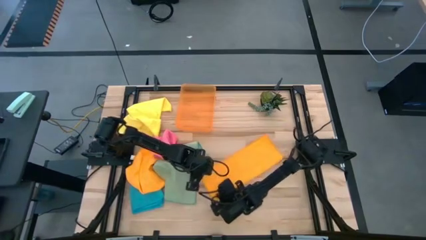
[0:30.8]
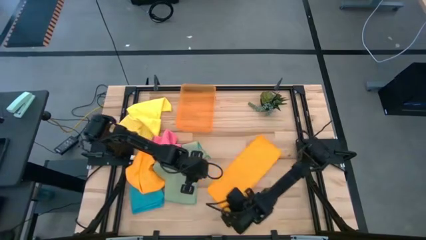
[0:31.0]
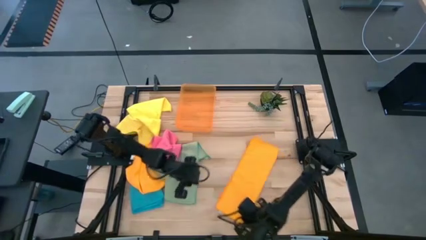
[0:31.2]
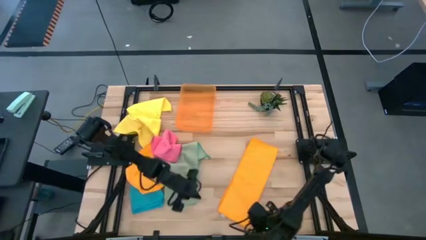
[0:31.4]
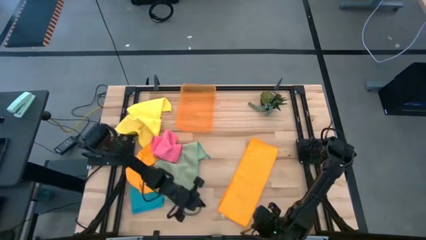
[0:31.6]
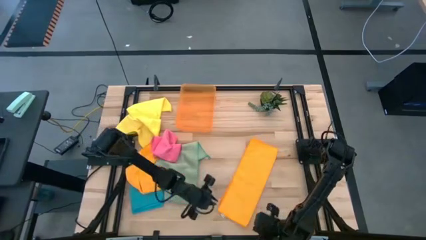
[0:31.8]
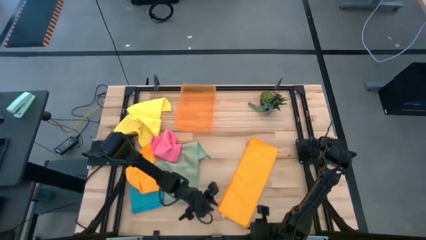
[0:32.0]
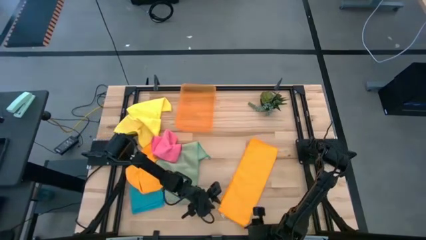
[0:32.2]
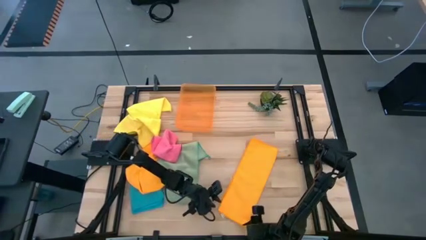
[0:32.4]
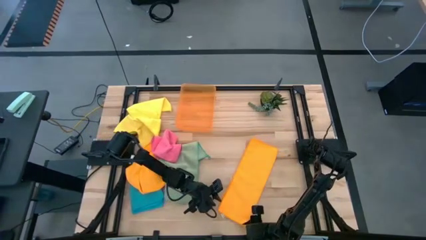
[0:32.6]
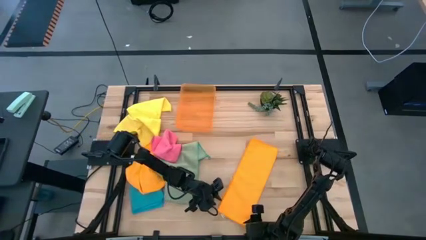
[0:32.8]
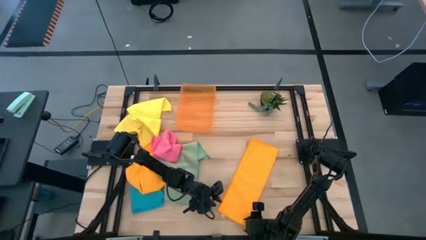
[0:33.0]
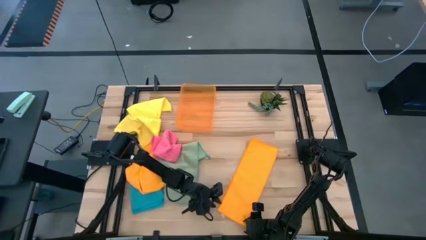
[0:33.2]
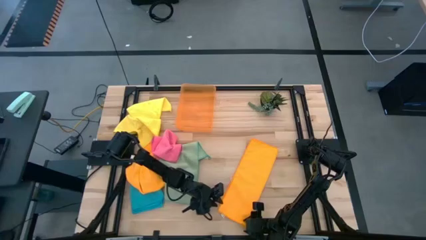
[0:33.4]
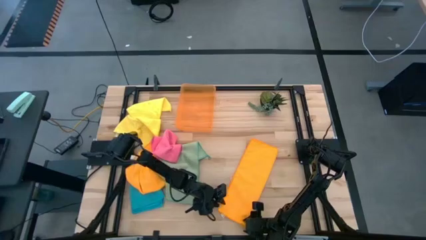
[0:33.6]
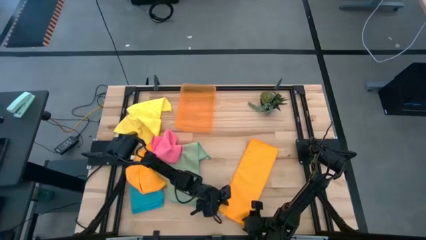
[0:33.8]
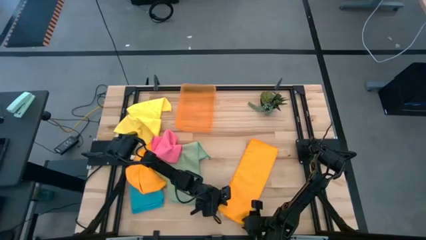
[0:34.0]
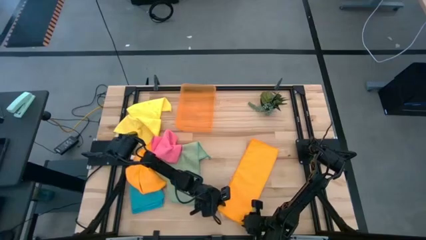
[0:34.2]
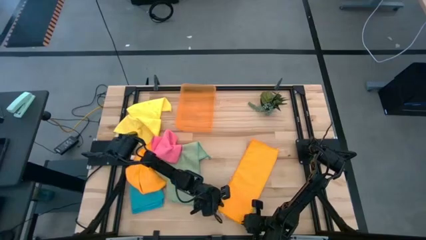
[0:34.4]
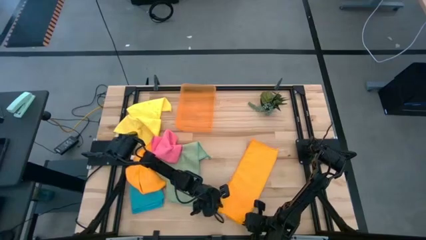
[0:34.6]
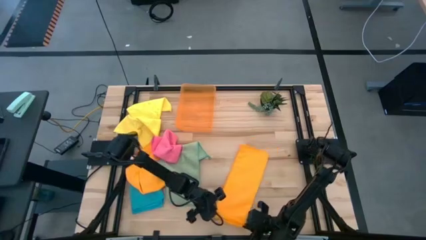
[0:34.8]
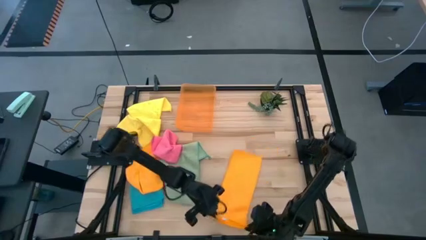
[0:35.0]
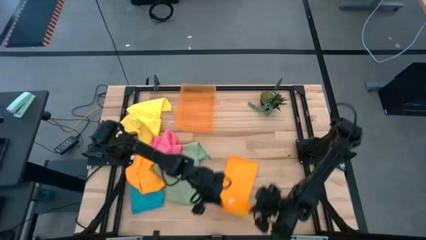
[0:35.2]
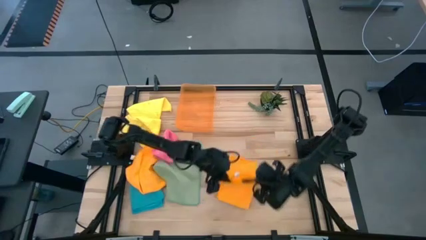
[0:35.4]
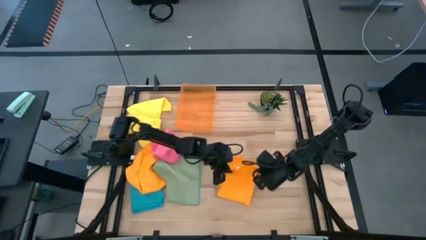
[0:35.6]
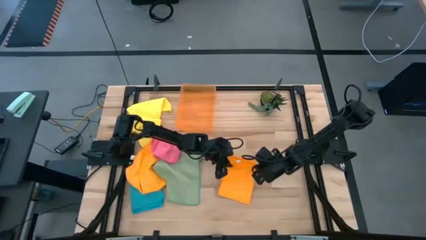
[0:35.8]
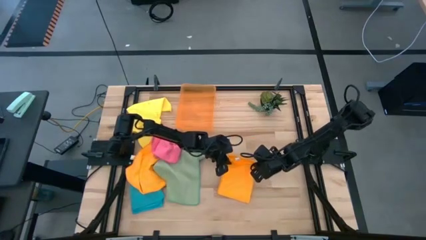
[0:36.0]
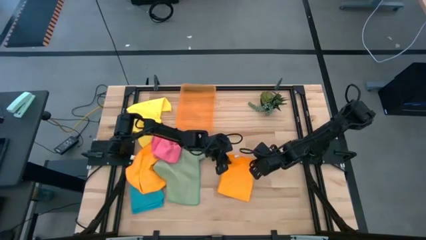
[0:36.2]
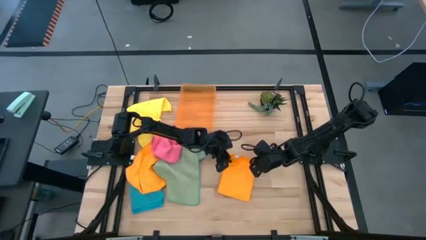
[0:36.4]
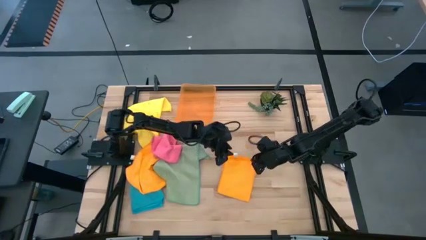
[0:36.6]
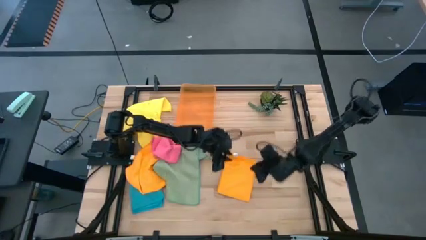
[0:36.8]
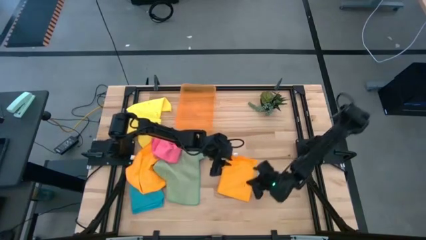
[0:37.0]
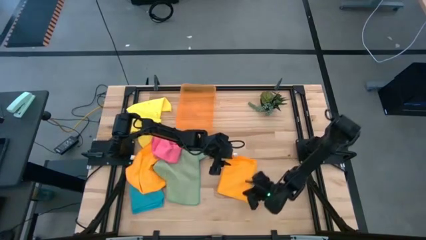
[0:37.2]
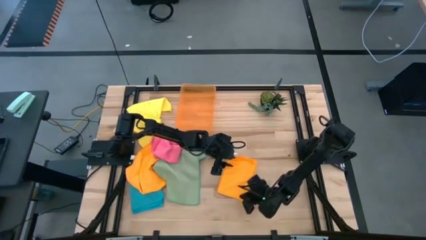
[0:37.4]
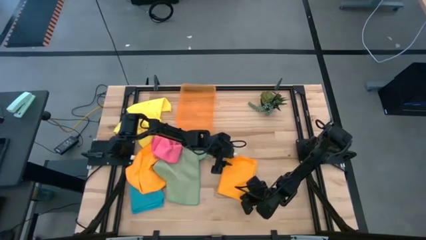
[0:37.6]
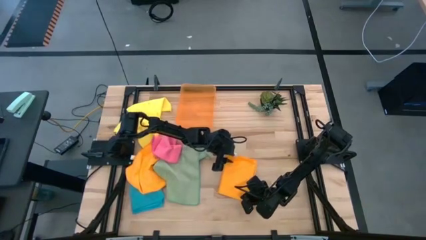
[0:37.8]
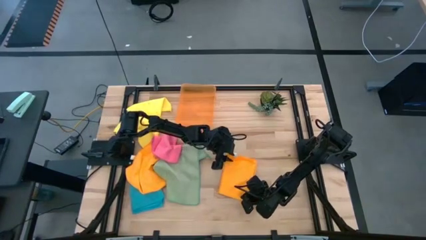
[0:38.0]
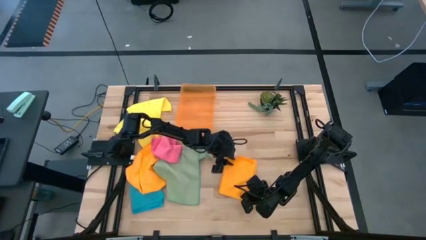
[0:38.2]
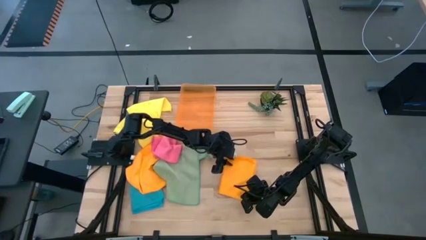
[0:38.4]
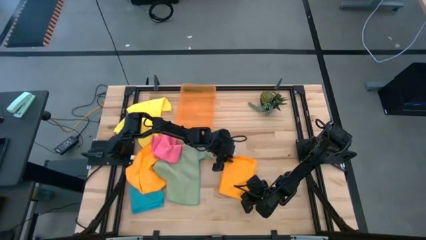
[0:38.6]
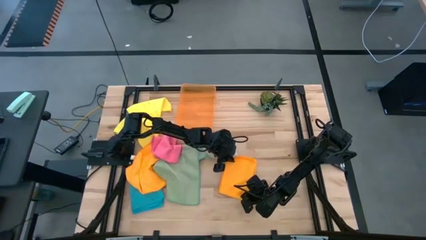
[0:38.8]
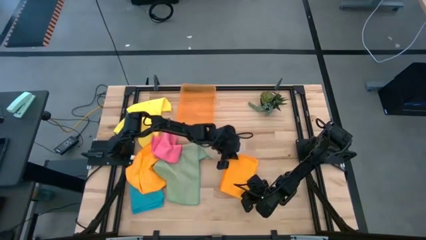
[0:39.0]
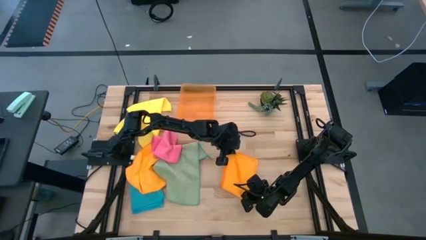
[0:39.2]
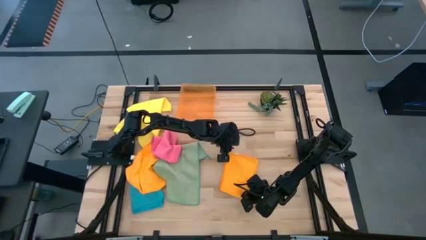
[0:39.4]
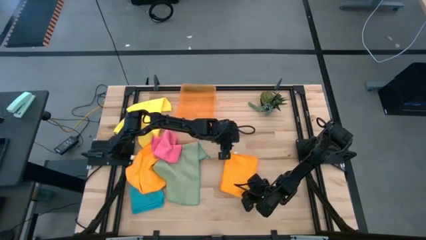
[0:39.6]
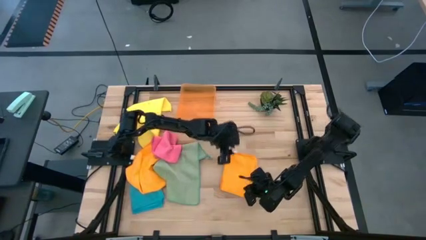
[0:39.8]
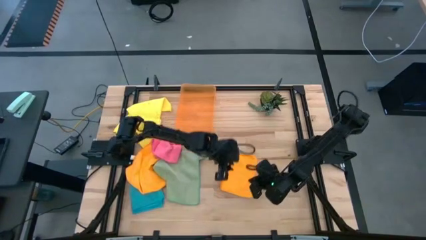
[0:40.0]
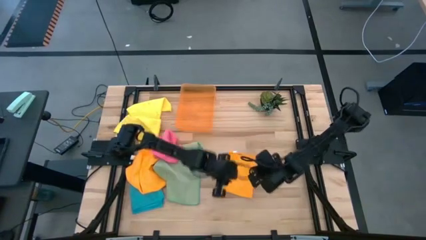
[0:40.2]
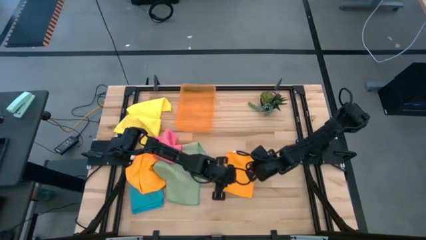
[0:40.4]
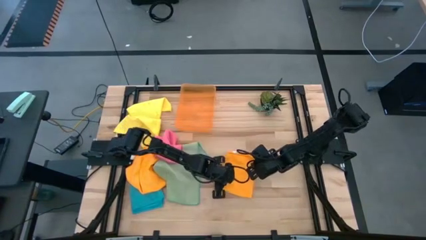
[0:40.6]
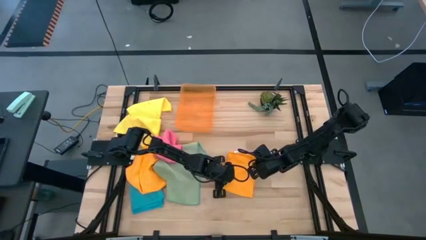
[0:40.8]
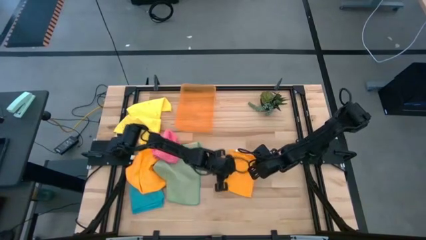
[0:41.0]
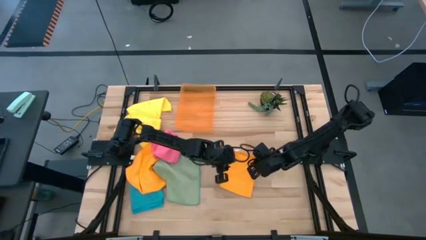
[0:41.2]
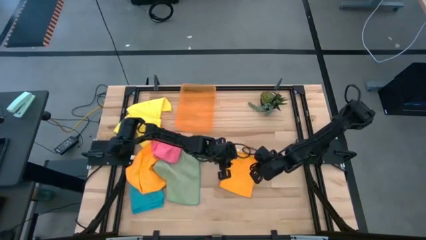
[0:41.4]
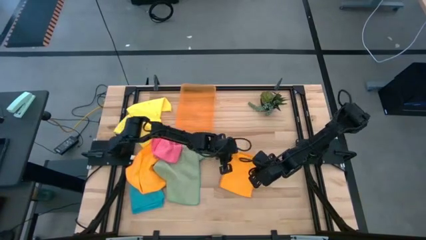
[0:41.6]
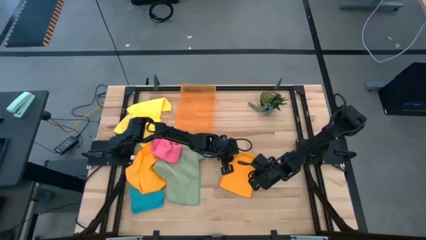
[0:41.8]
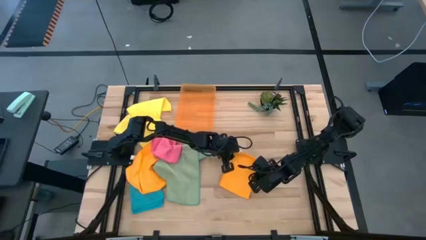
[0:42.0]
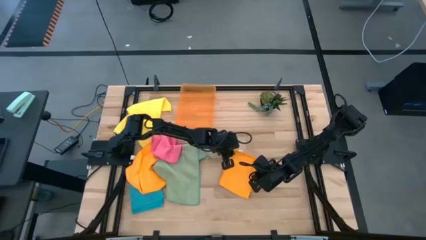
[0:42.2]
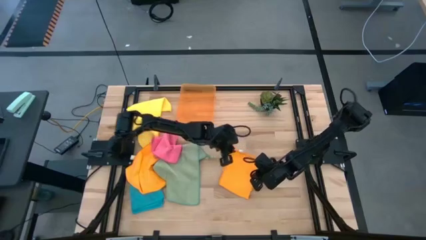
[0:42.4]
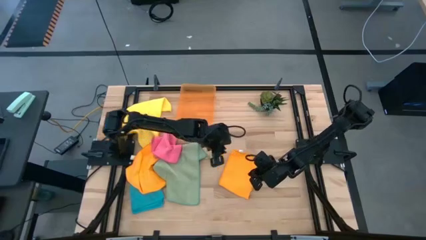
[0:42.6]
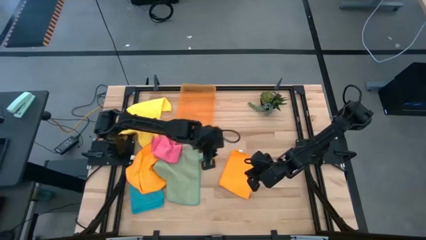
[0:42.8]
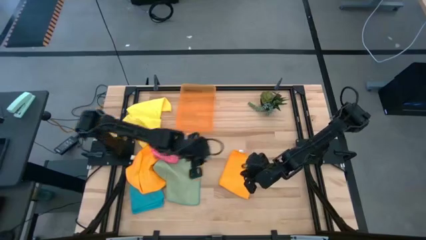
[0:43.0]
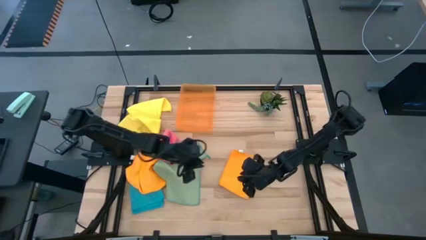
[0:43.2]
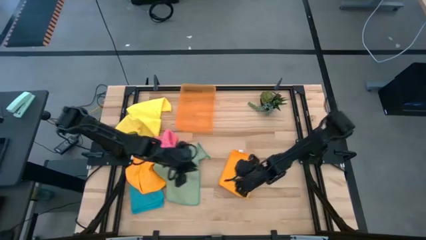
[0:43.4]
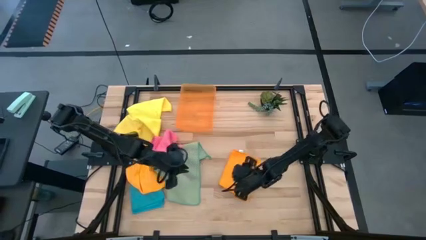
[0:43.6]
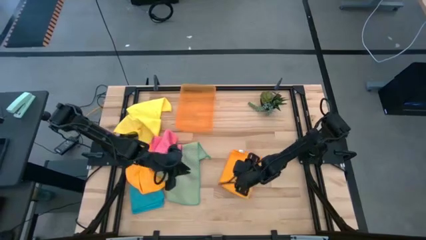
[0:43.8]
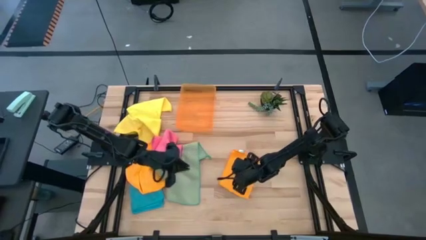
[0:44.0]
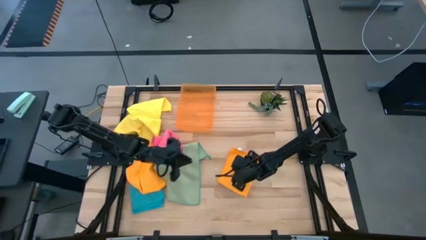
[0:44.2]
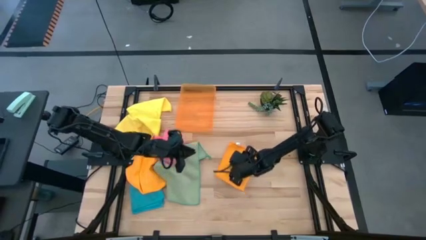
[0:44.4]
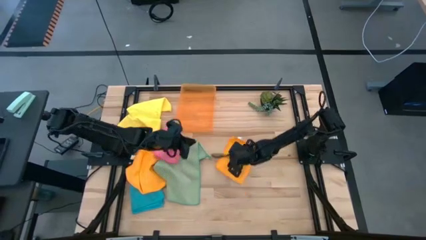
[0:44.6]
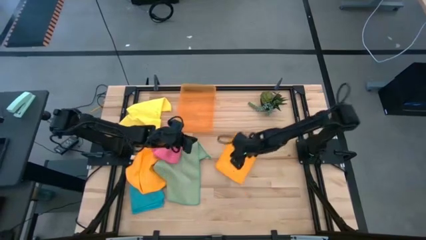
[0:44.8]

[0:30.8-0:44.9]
Task: Fold microfiber towels
Fold the right orange microfiber cloth
